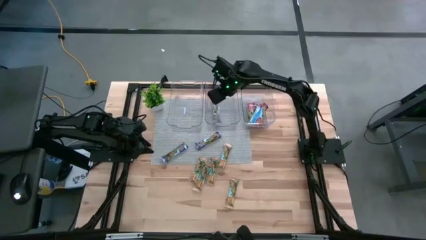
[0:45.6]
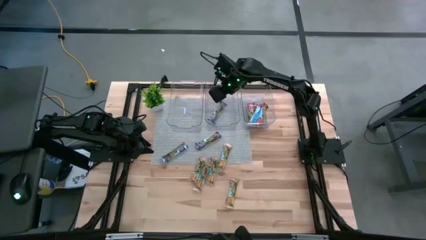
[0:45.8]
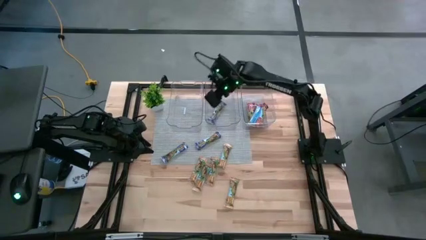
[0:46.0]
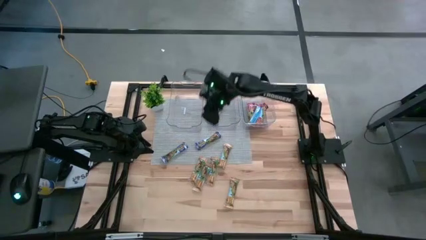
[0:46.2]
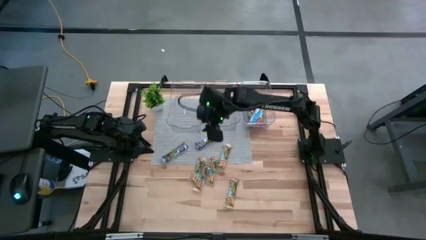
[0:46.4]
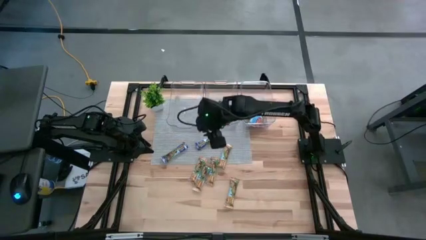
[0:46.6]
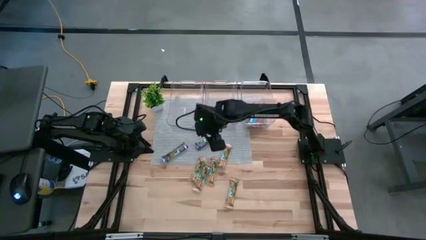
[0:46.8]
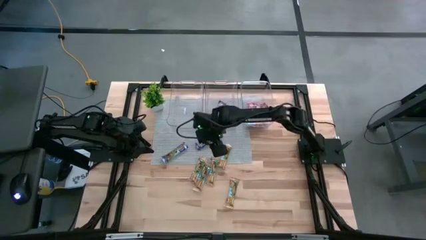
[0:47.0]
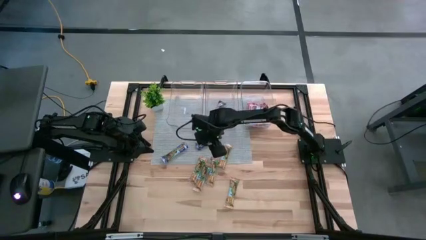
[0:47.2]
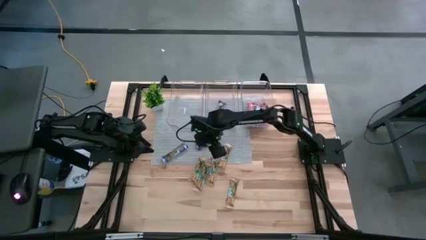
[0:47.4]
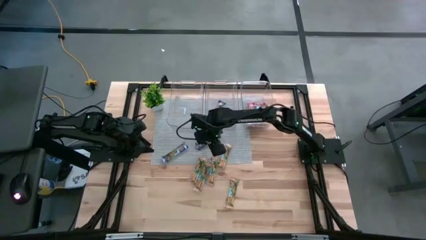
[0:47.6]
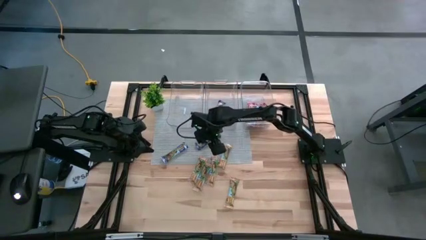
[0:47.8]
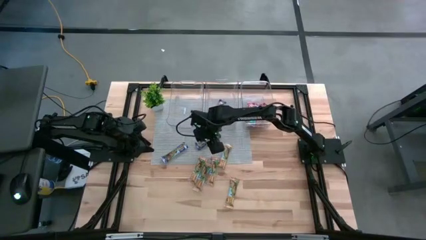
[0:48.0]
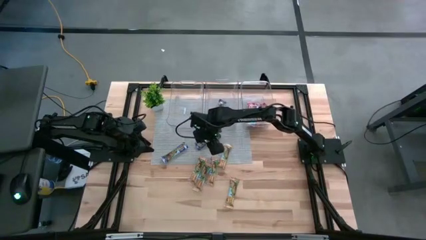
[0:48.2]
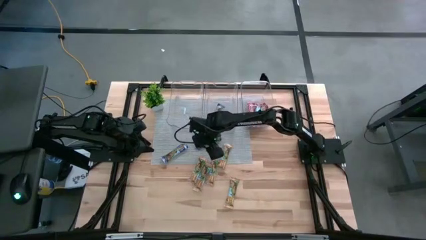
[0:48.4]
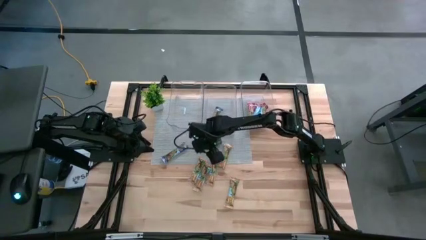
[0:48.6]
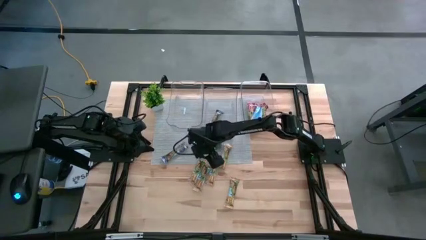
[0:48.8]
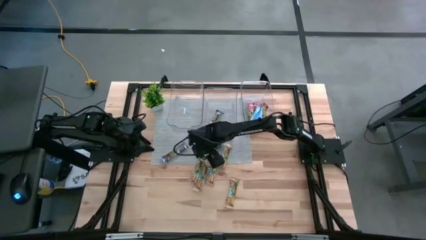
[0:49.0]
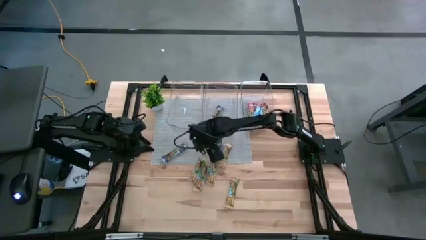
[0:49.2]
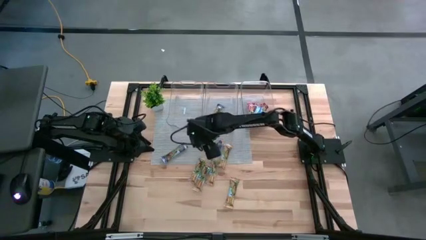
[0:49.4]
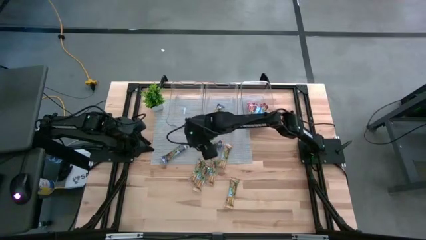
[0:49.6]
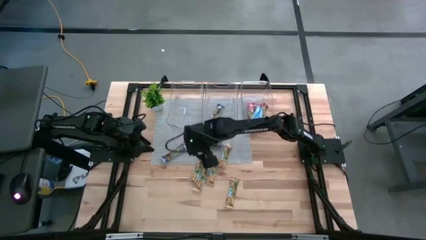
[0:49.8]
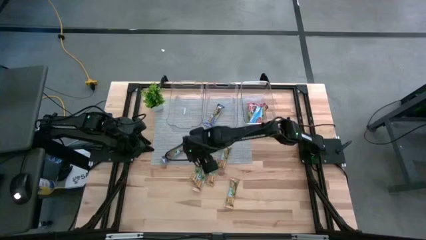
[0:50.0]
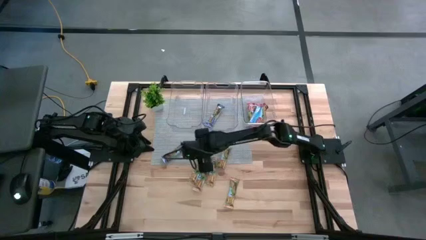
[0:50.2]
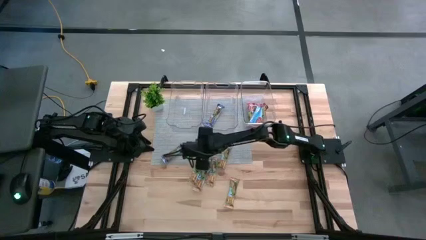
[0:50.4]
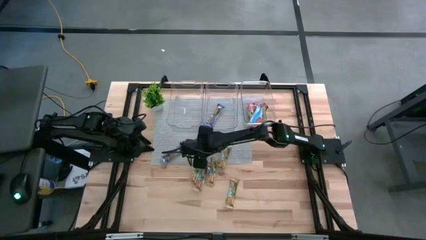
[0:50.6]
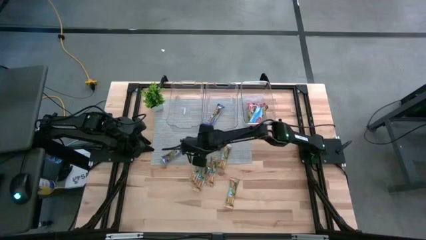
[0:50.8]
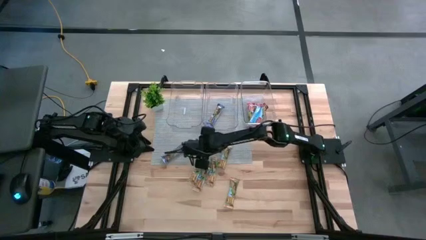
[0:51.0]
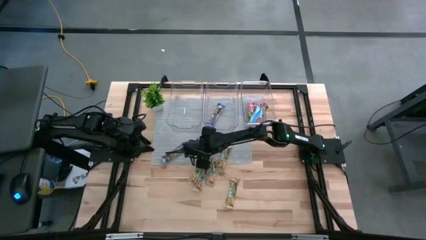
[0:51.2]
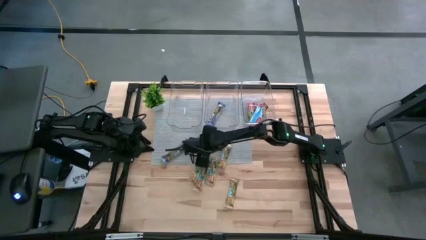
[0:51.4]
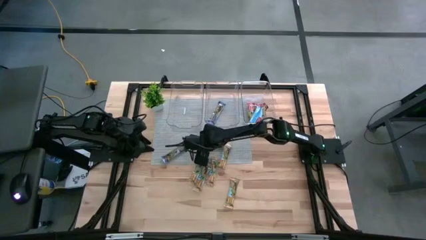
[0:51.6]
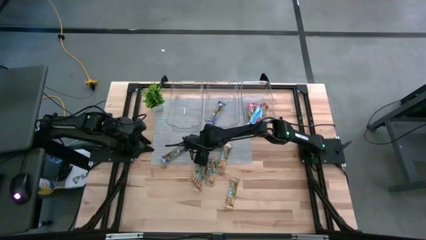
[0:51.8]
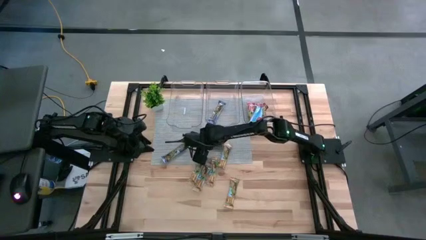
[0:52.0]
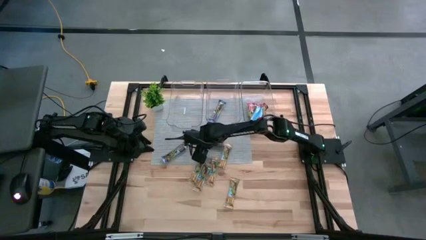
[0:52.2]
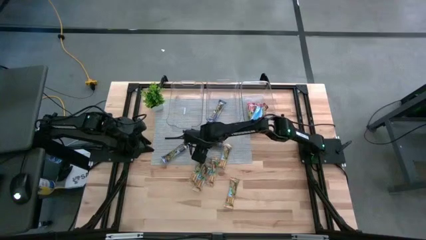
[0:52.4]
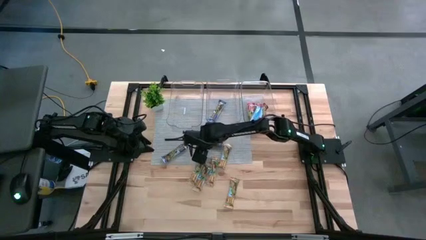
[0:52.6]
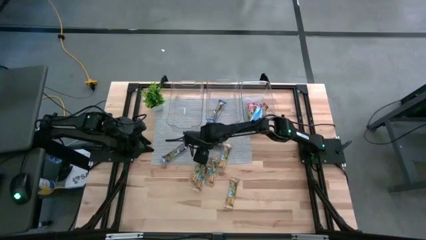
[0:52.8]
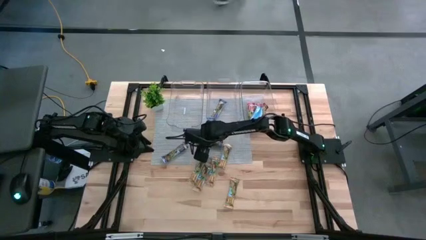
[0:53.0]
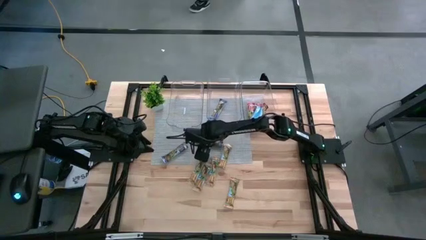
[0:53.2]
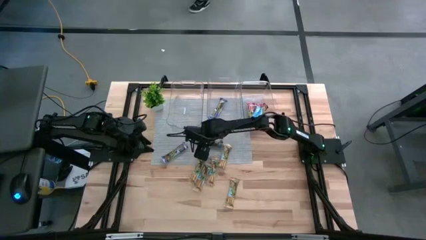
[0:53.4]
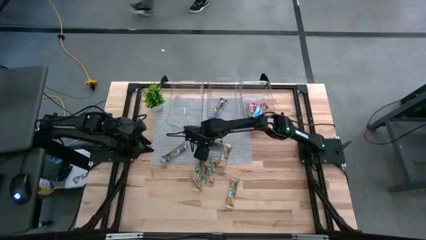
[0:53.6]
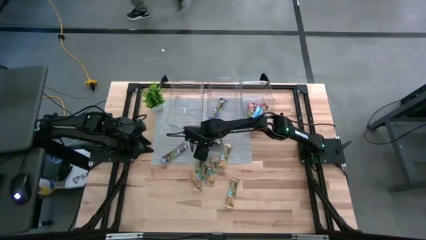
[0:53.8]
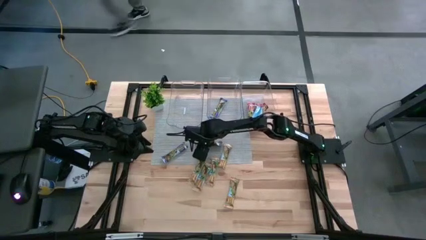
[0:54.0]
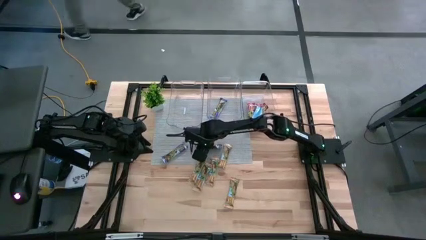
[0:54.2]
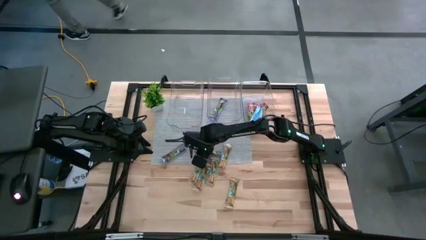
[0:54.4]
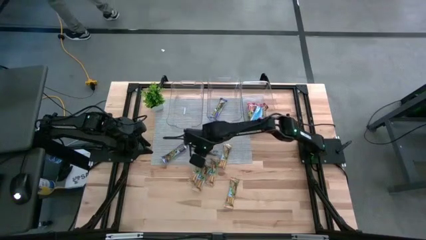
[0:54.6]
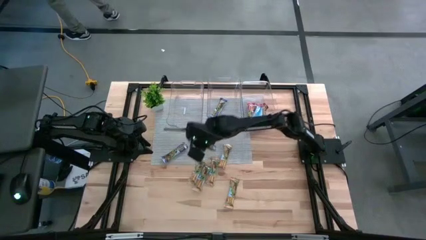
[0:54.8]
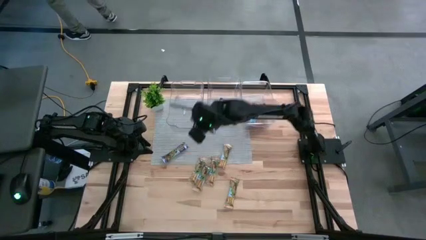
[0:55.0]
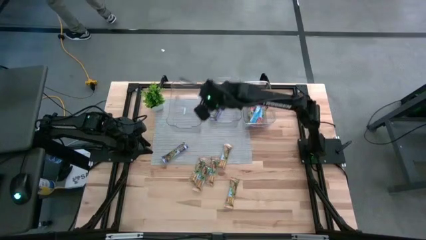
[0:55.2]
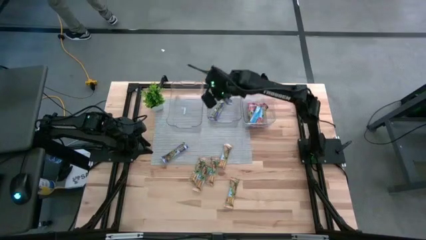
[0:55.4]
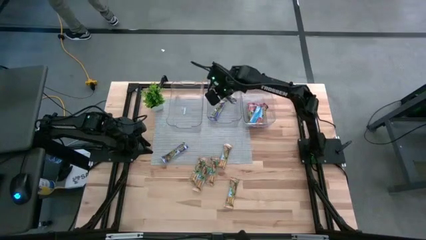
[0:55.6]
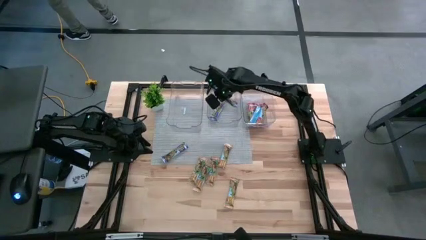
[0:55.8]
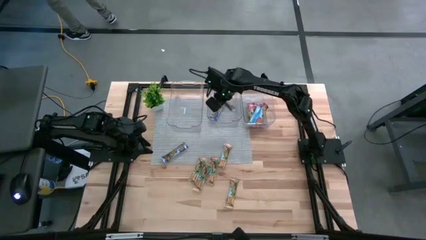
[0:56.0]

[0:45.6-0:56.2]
Task: Pick and place Granola Bars by type
Put the blue granola bar into the middle transparent bin

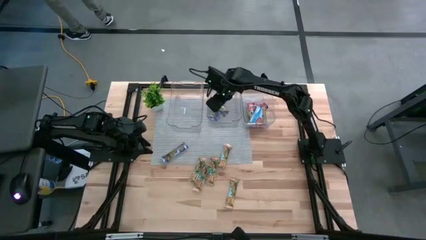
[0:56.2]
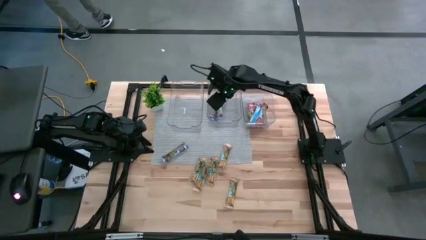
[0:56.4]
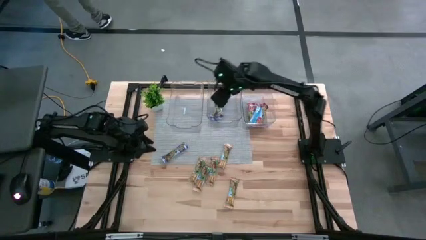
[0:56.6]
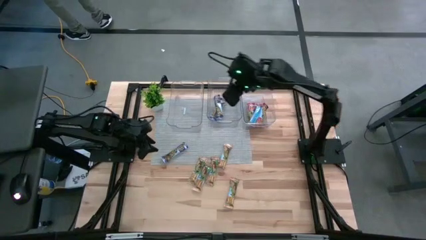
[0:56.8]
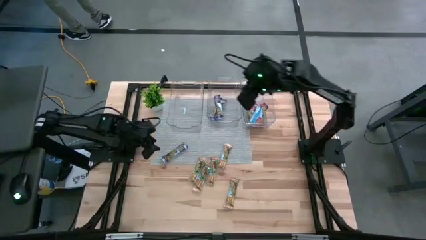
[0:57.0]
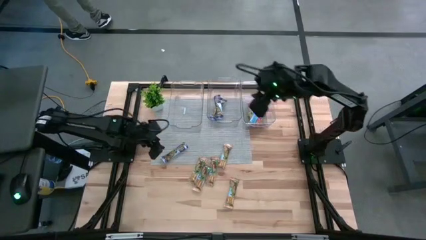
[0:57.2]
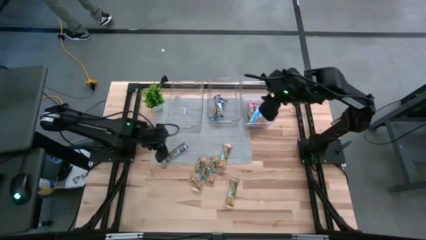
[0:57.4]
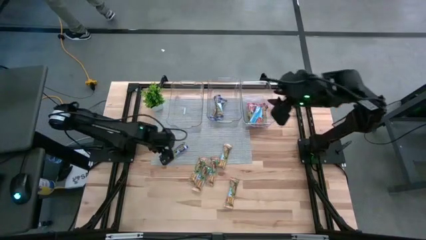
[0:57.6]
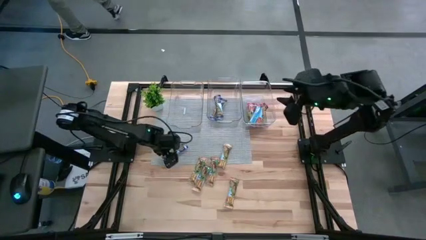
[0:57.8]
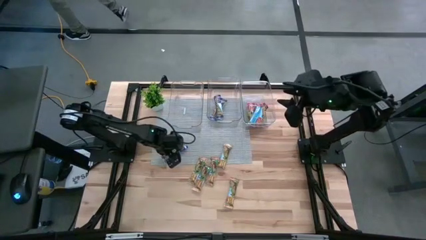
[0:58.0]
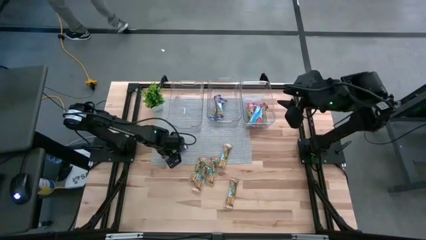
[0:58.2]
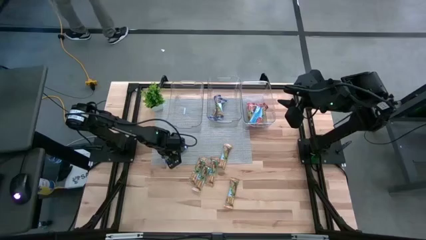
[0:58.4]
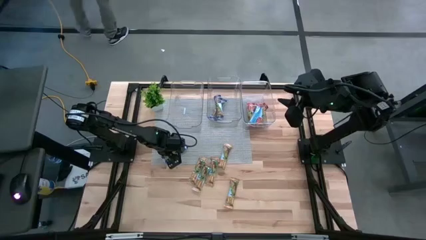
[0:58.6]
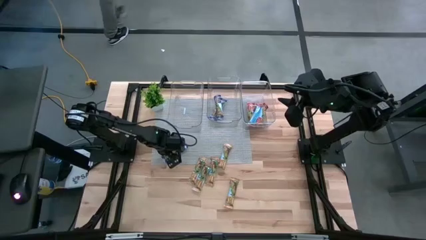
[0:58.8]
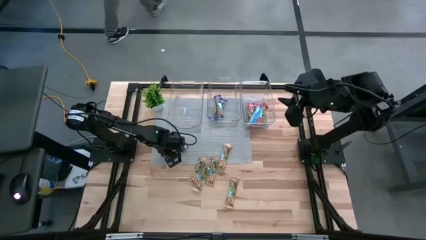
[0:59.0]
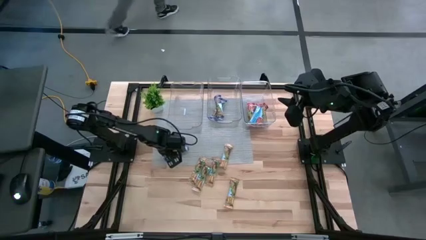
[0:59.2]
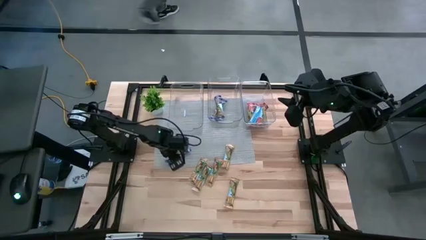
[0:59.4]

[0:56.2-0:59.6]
Put the blue granola bar into the middle transparent bin

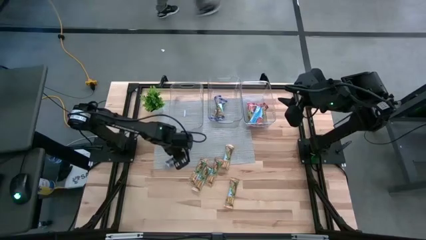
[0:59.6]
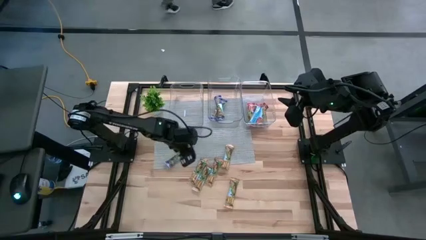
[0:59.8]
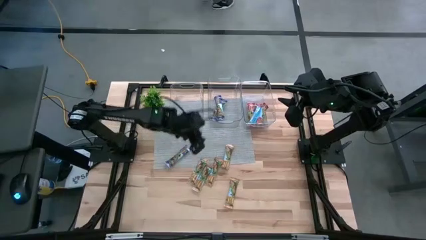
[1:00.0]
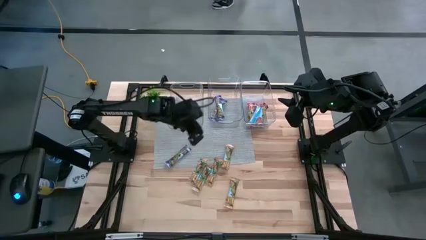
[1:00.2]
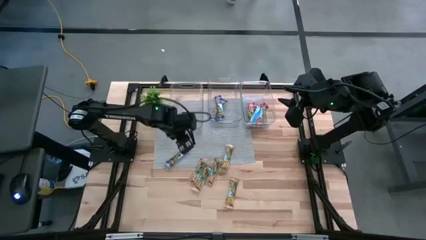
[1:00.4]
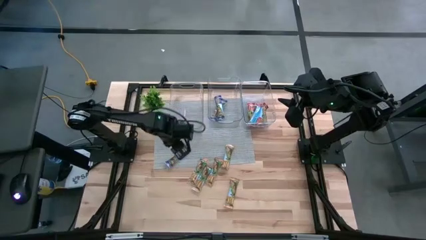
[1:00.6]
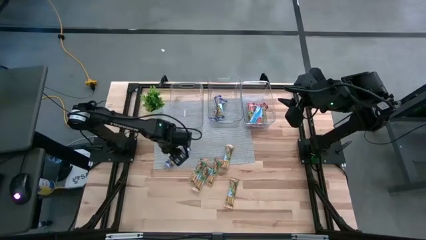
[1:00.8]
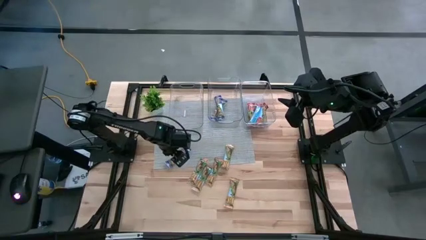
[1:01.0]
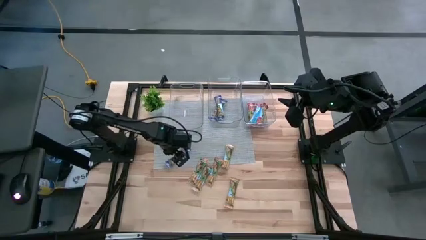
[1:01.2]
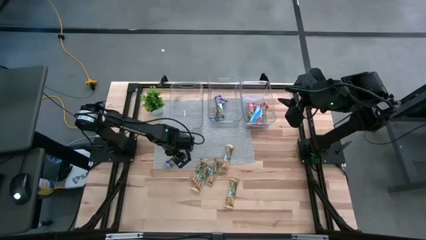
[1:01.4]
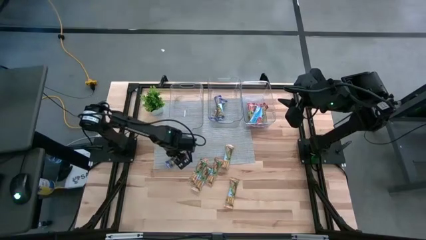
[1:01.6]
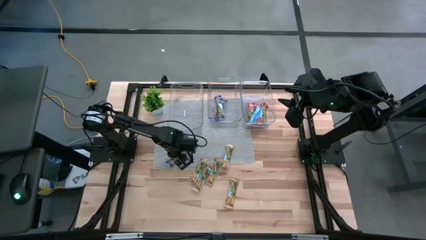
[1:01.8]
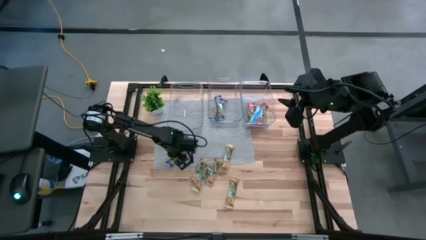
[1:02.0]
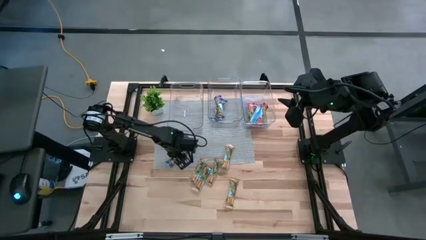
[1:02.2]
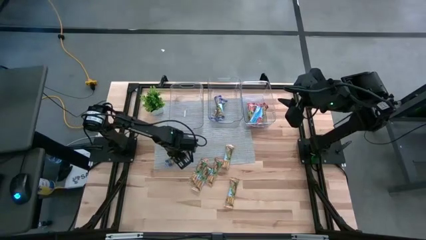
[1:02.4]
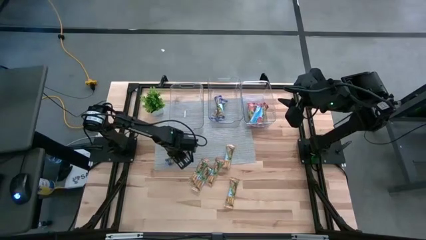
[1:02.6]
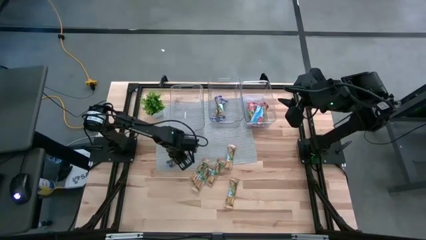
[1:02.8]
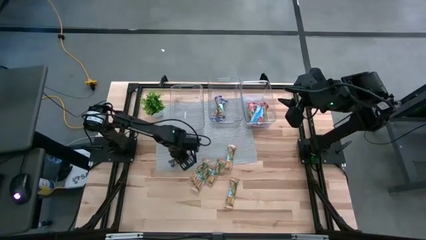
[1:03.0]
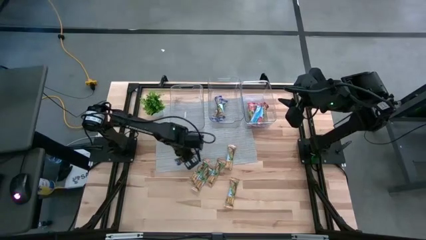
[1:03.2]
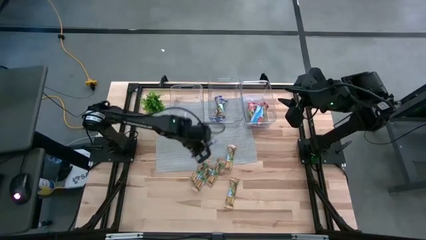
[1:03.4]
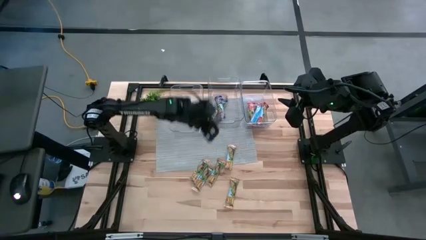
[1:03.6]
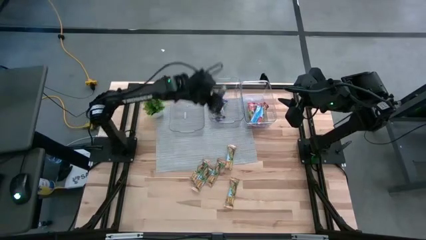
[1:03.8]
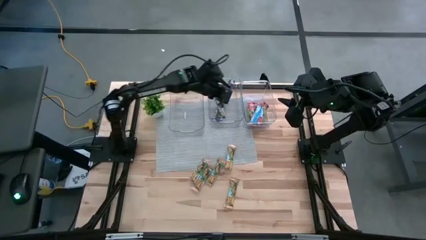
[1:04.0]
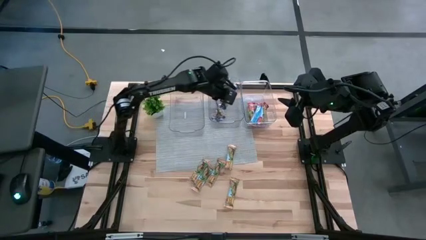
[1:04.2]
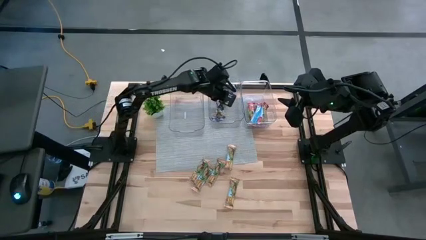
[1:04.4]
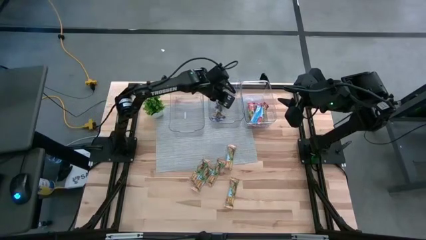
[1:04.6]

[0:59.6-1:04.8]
Put the blue granola bar into the middle transparent bin
